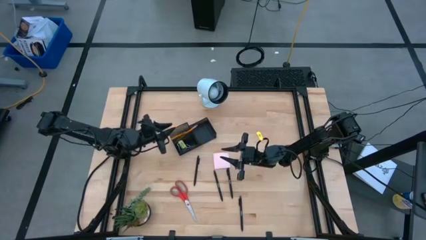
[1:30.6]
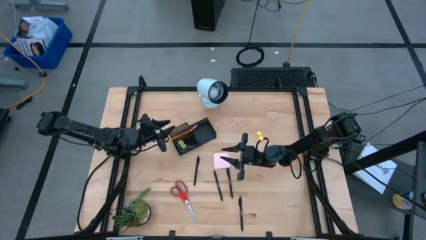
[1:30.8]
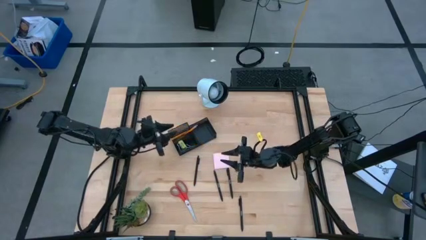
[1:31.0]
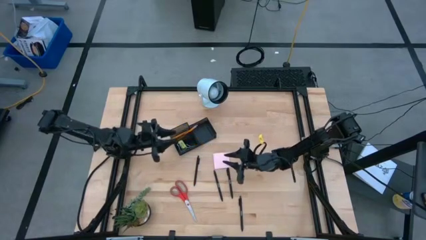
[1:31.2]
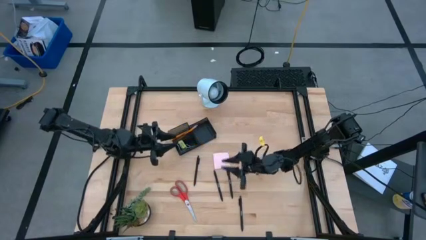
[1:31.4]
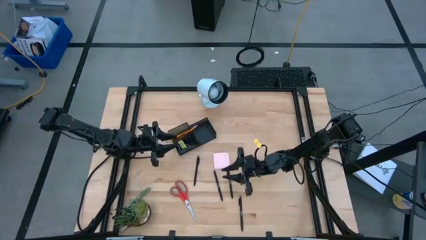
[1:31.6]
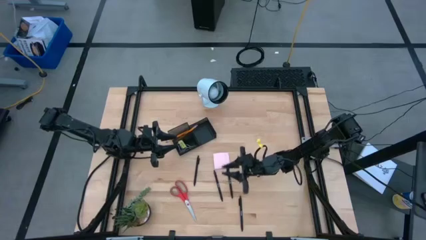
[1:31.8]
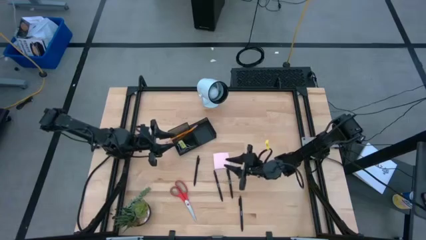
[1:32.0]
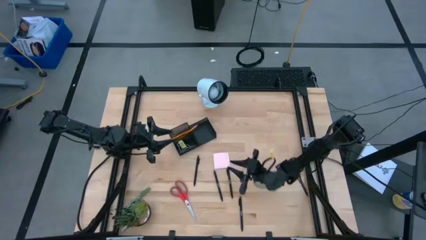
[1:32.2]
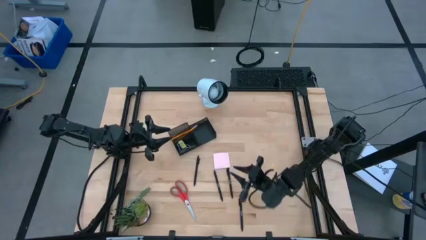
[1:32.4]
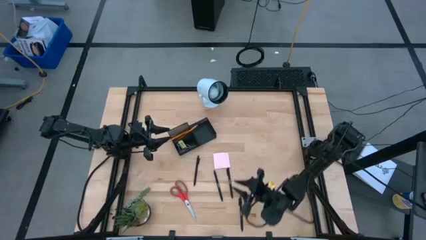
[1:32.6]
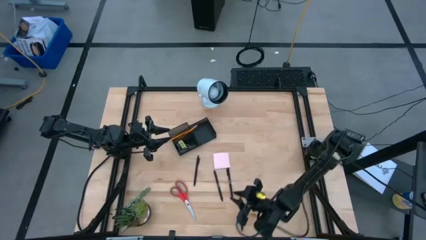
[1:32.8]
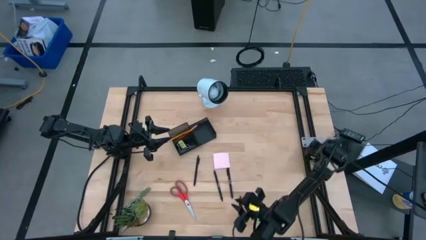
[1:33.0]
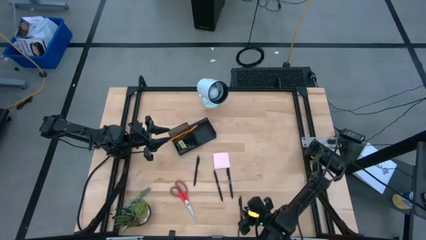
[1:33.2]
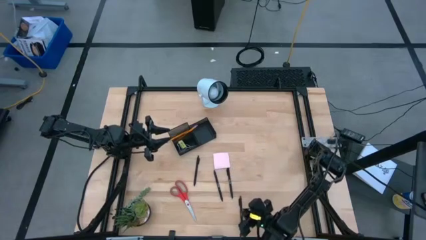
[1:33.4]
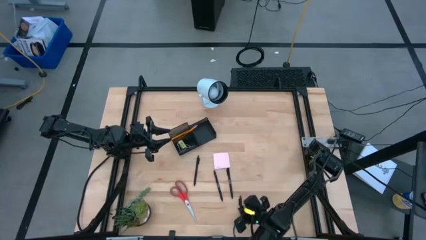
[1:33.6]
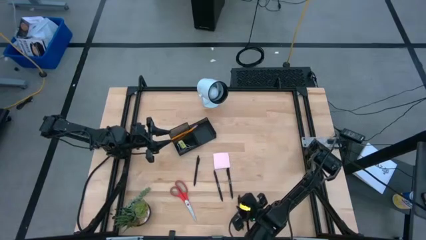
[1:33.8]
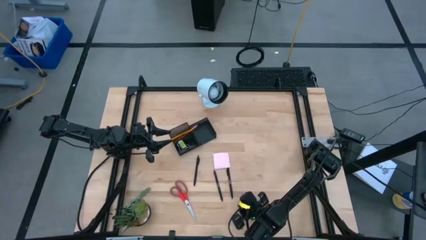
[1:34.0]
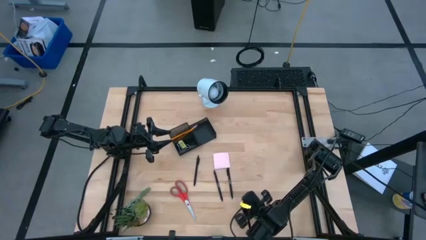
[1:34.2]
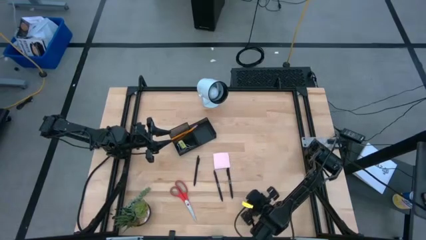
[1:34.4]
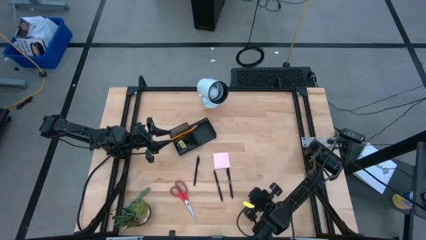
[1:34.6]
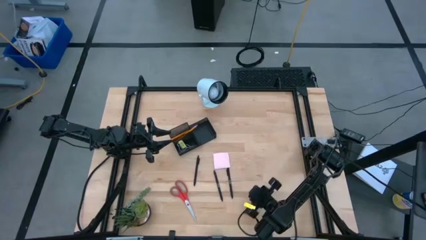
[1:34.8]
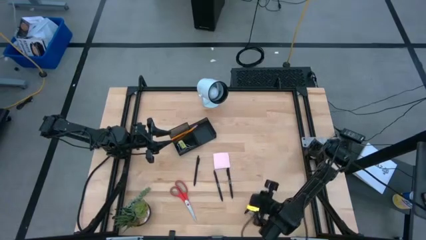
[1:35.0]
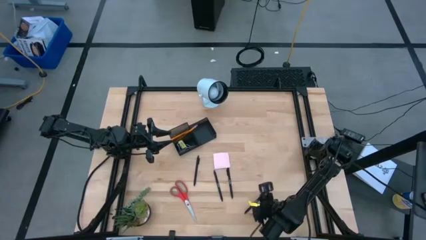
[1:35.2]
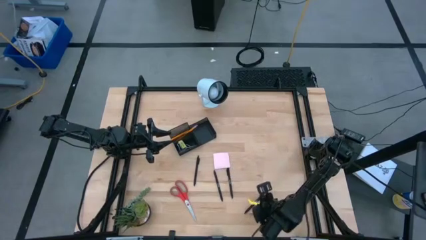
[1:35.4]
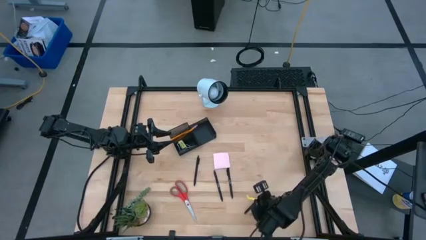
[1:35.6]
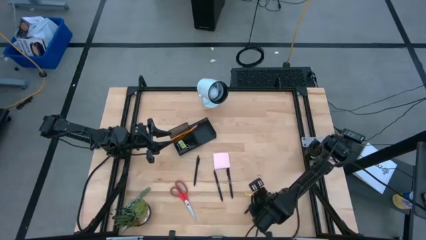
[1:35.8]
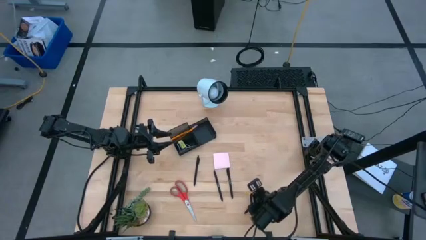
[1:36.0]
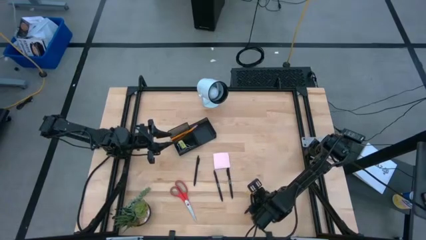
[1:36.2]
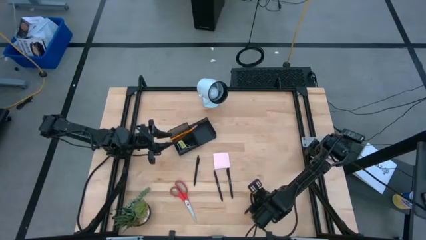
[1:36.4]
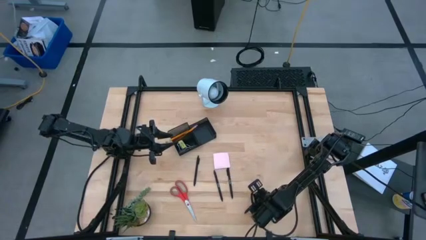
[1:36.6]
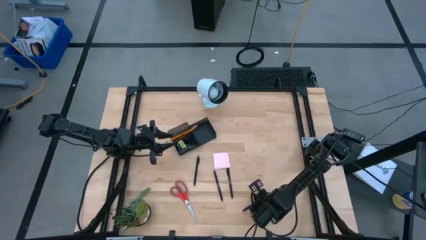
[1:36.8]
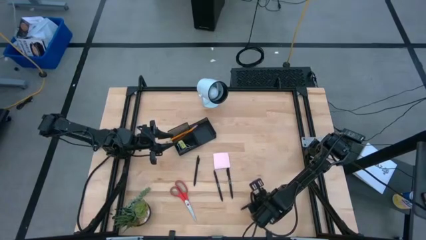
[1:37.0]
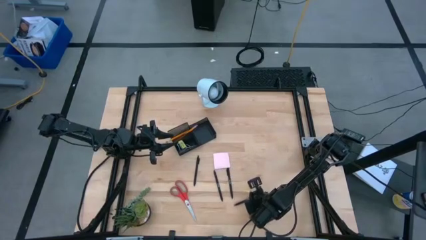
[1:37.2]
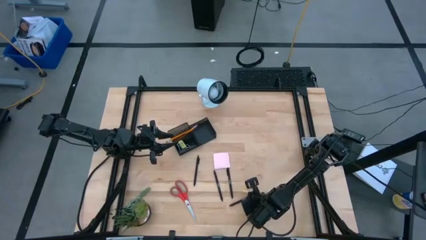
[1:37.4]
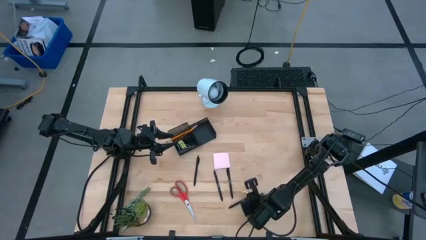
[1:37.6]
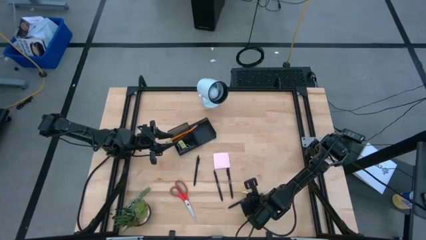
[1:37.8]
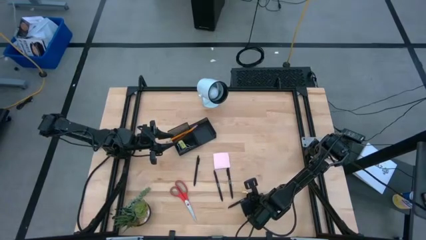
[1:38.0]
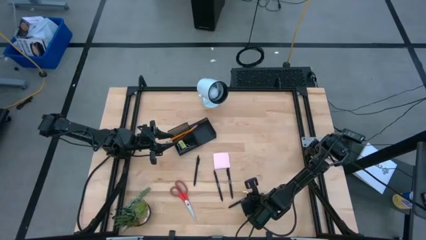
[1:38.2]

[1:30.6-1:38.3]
Task: Pick and place office supplies into organizer
Put the black pen into the black desk organizer

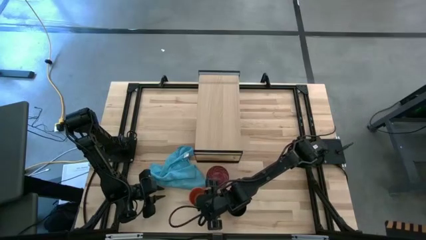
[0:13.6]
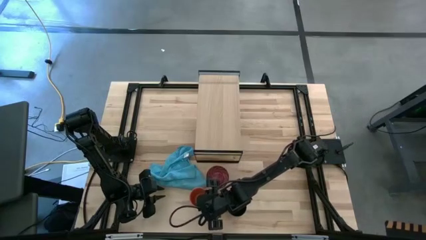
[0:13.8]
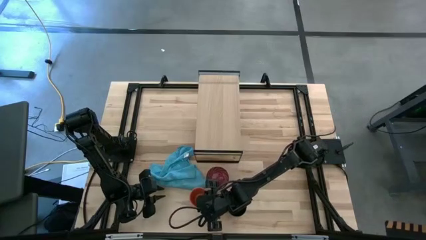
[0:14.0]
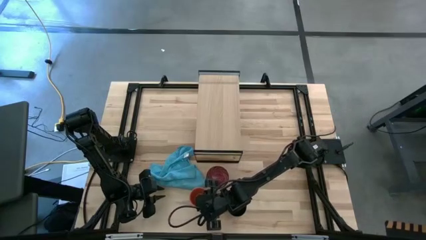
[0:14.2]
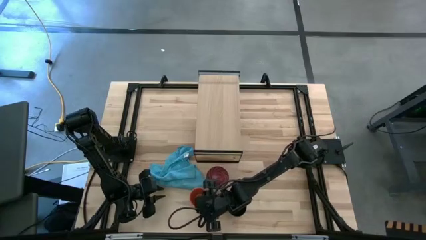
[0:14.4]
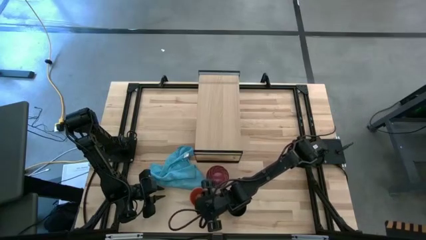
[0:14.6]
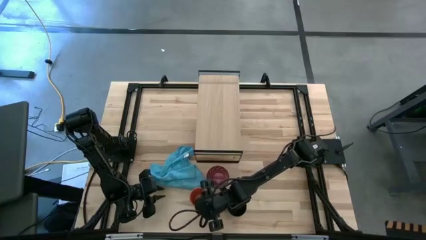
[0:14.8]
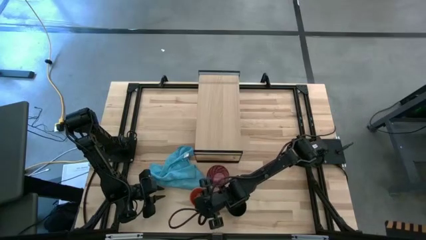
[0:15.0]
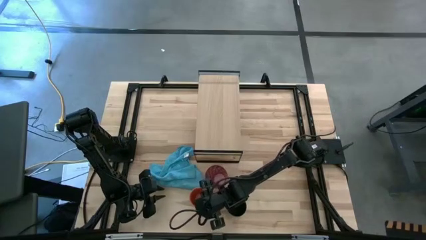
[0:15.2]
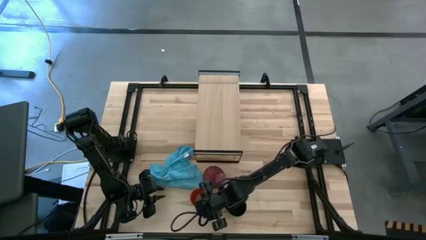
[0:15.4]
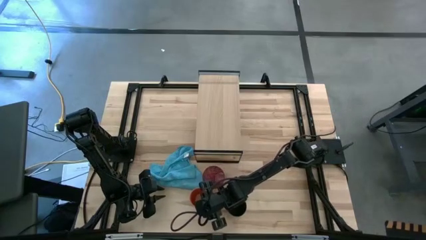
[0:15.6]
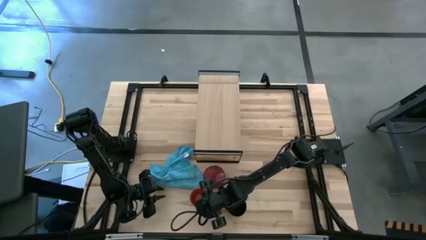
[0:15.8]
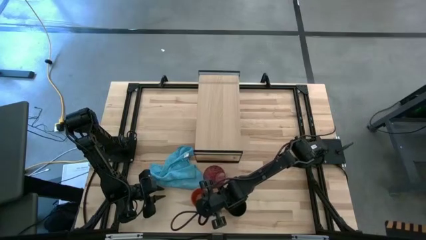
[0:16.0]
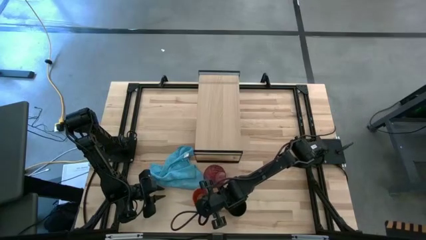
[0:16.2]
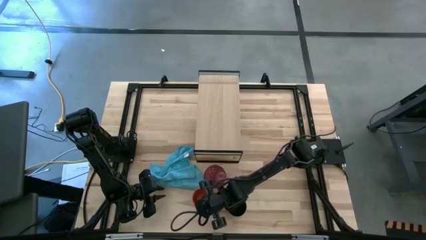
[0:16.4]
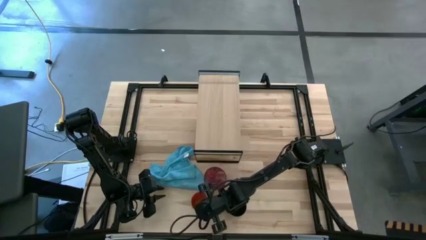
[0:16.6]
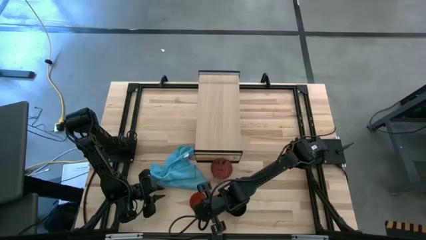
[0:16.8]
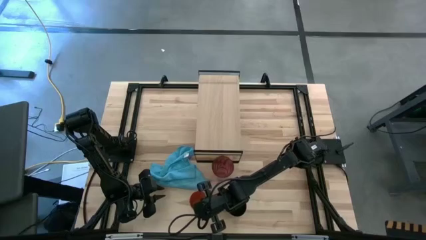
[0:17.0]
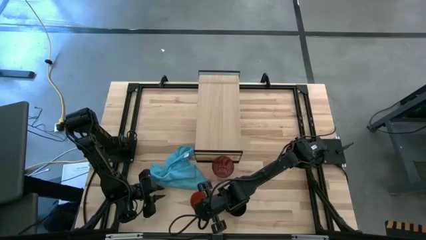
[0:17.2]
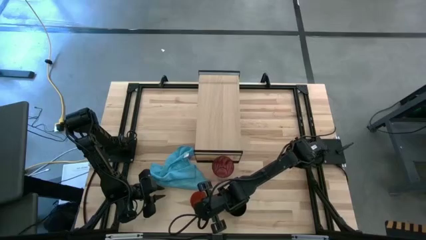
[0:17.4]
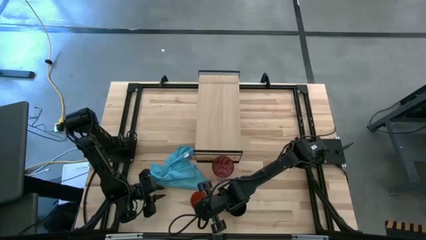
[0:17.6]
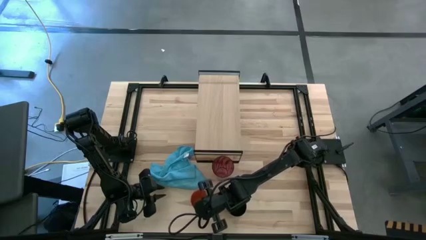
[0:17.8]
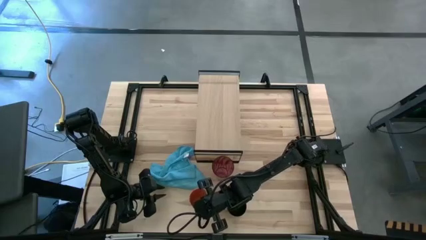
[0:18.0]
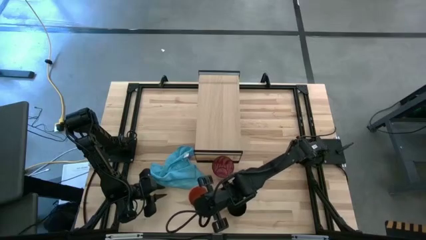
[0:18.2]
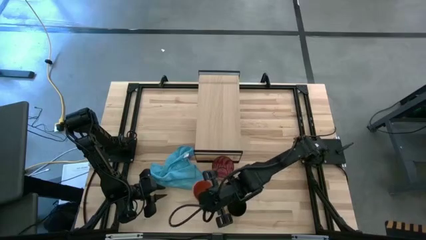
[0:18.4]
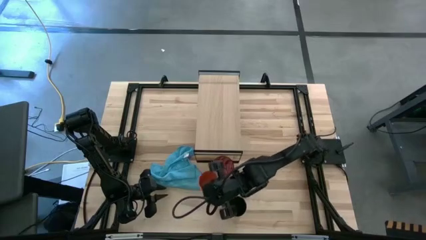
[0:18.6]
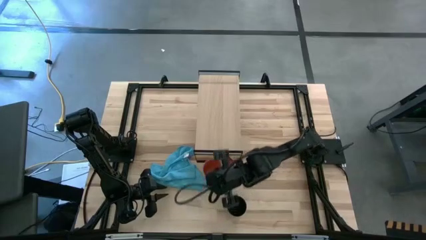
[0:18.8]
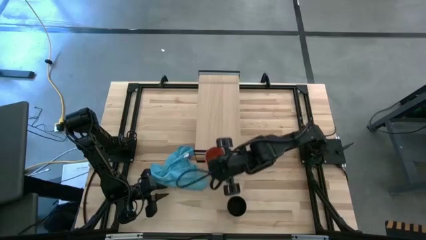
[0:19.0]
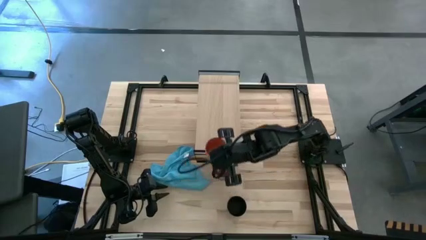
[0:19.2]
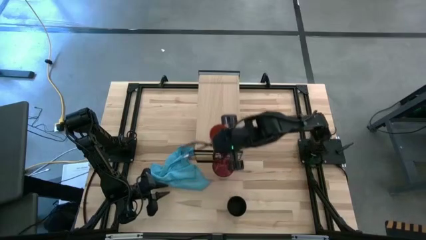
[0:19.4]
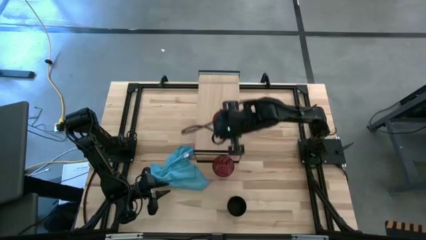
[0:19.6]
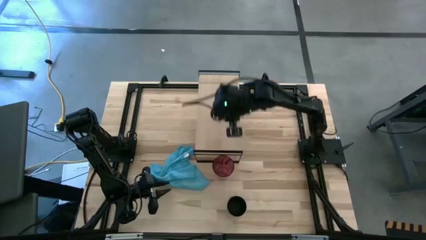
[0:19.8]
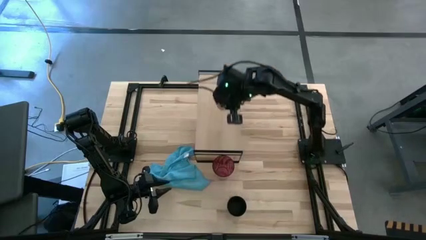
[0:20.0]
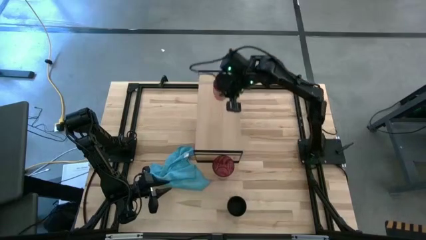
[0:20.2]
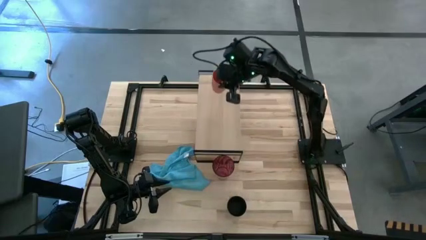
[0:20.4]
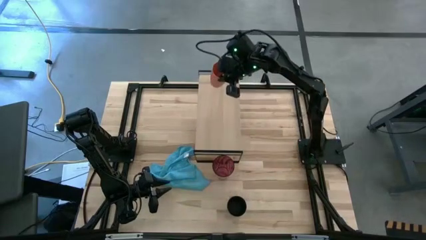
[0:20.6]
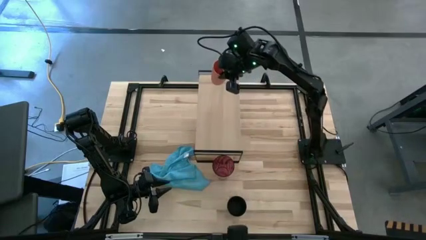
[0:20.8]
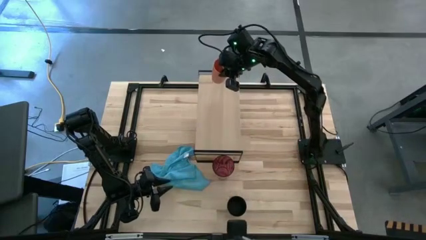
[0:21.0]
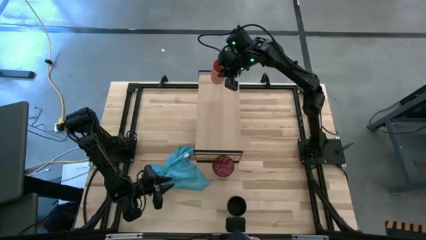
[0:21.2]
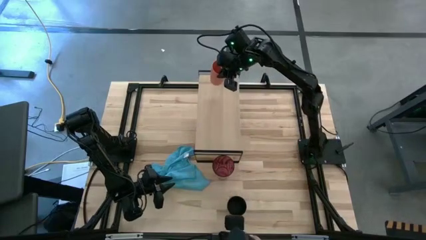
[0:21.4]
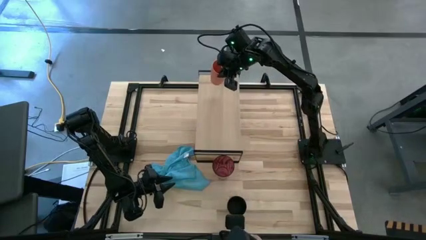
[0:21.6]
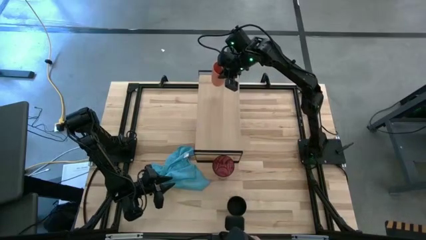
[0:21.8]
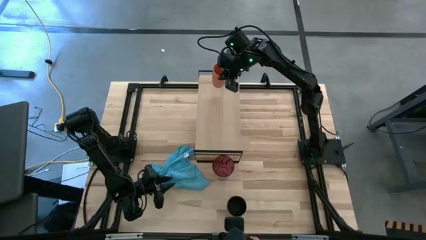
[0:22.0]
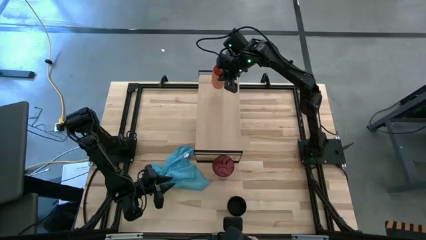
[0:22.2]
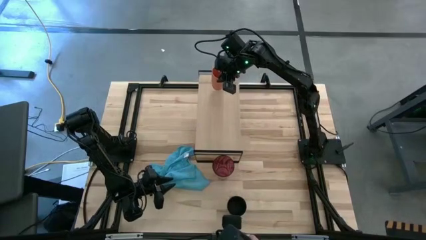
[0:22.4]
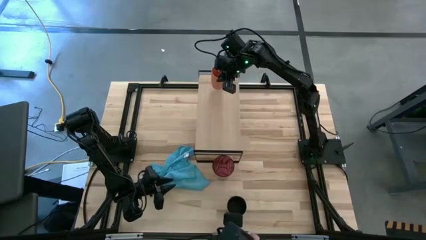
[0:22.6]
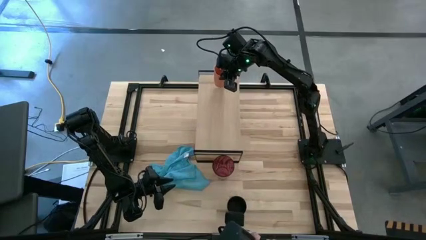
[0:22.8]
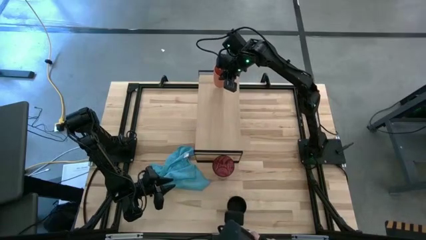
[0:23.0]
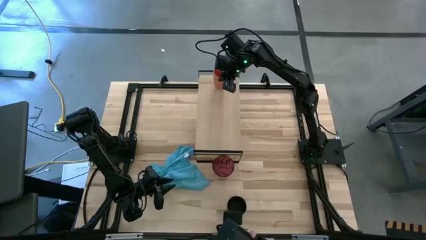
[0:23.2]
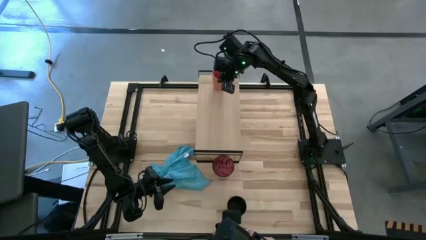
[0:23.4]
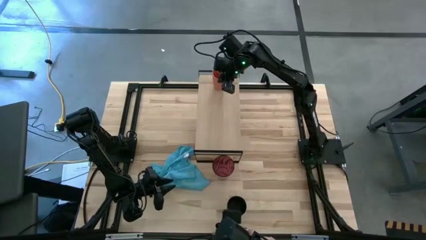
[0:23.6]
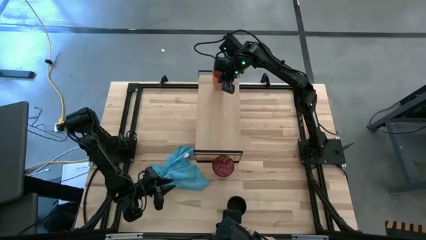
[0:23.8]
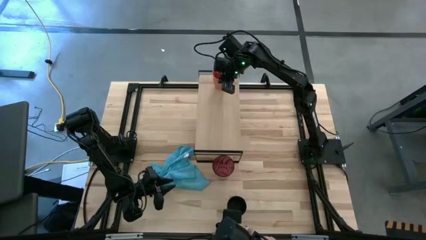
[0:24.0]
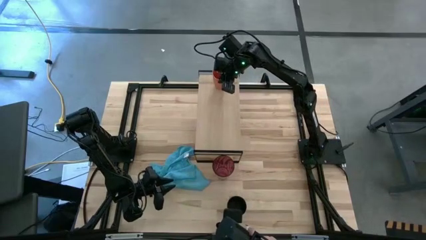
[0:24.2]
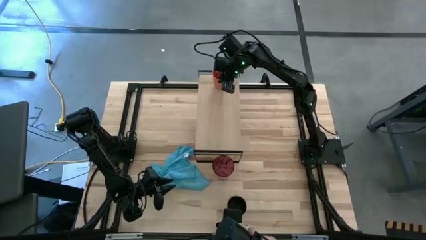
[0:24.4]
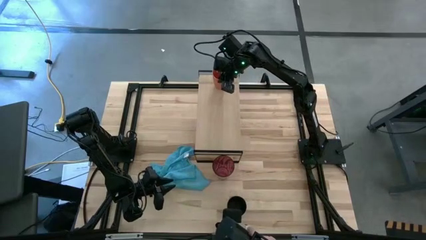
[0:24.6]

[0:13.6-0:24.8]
Task: Stack small to large cups/mugs on shelf
Put the orange cup on the shelf
